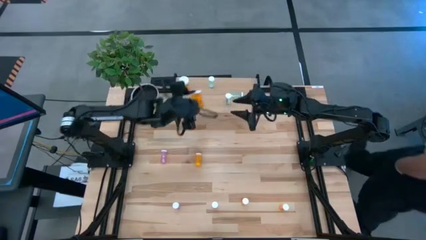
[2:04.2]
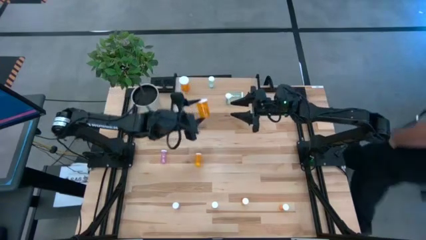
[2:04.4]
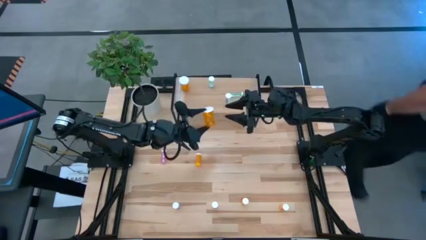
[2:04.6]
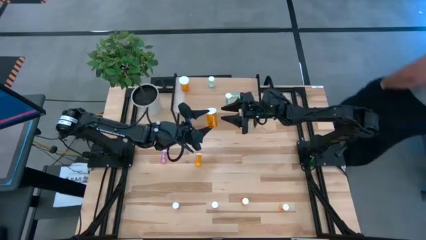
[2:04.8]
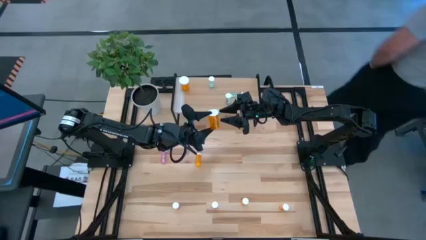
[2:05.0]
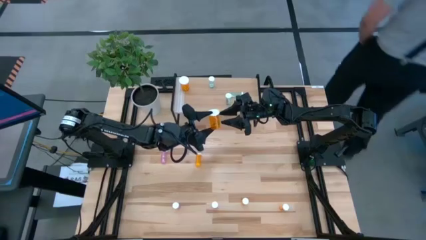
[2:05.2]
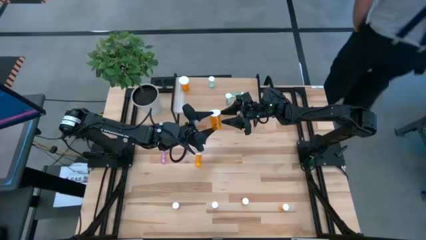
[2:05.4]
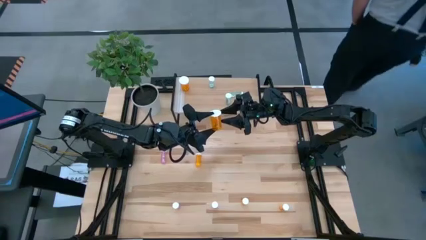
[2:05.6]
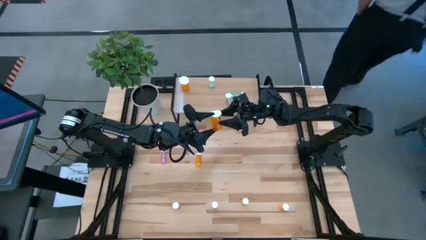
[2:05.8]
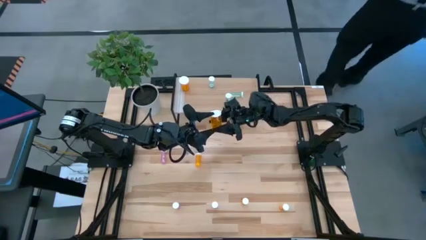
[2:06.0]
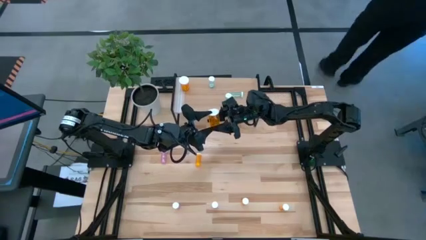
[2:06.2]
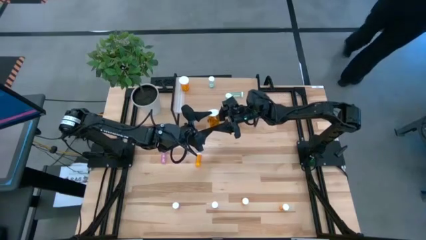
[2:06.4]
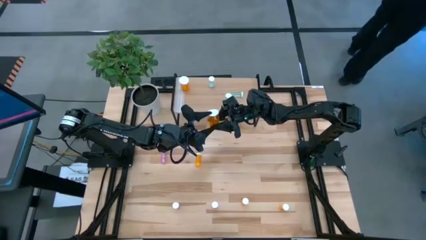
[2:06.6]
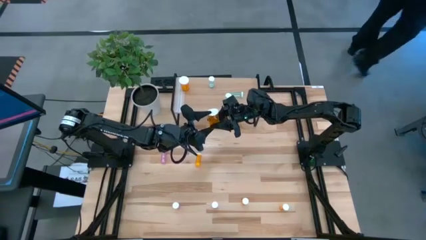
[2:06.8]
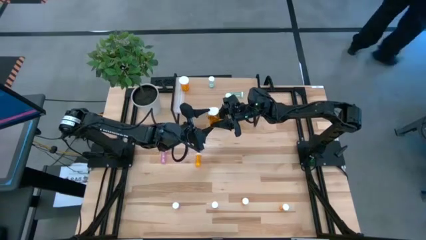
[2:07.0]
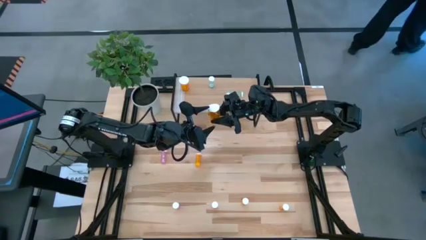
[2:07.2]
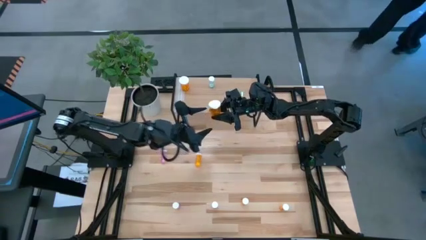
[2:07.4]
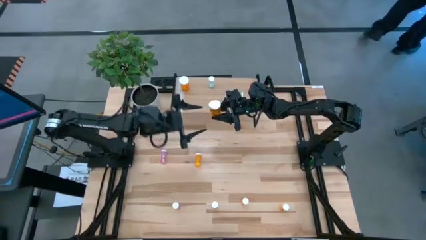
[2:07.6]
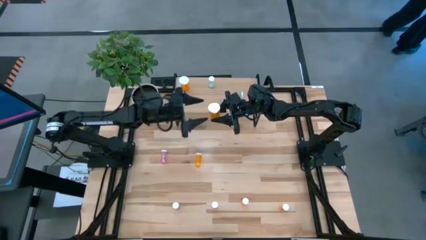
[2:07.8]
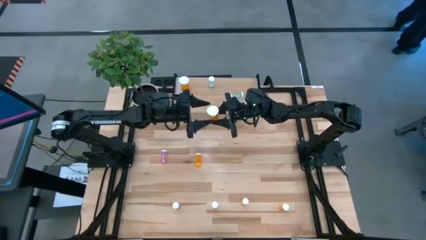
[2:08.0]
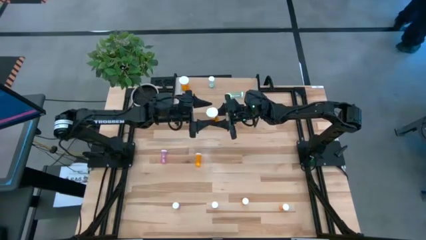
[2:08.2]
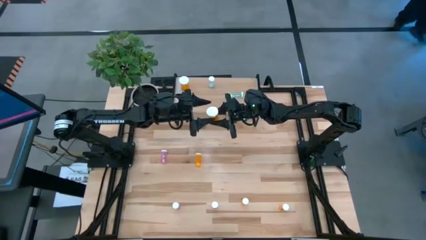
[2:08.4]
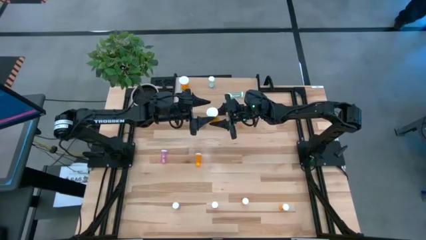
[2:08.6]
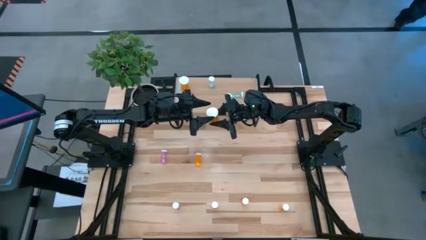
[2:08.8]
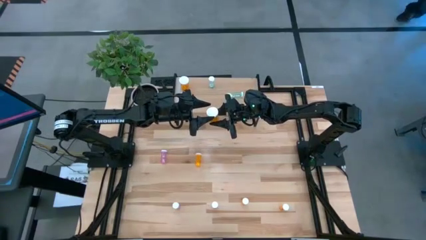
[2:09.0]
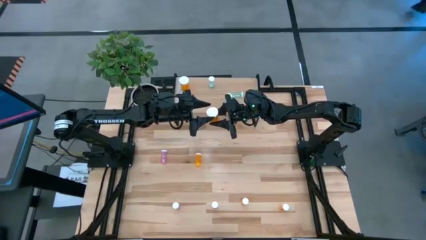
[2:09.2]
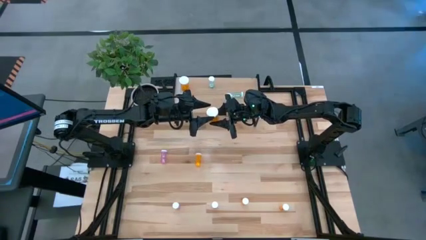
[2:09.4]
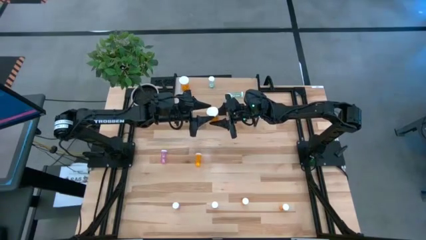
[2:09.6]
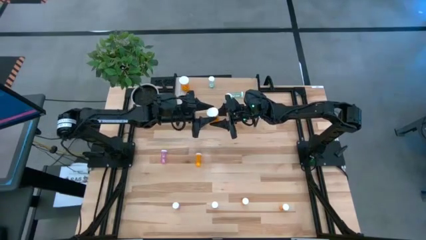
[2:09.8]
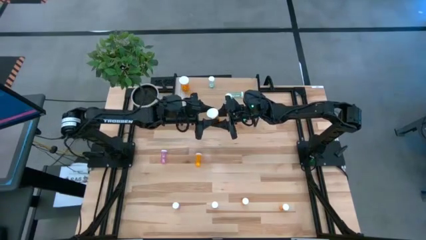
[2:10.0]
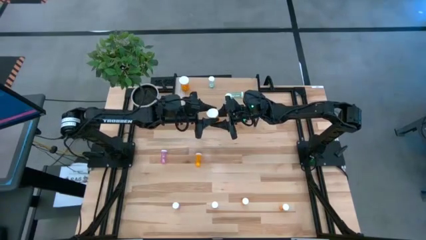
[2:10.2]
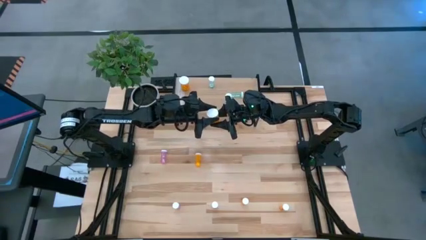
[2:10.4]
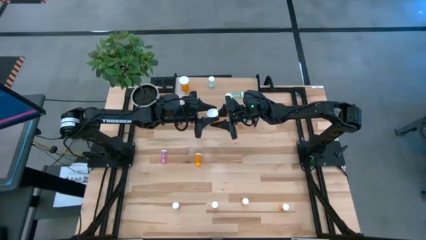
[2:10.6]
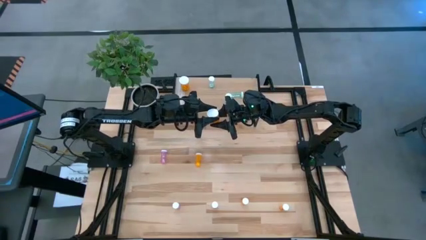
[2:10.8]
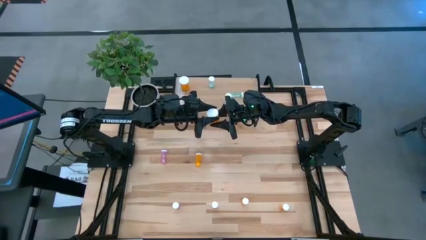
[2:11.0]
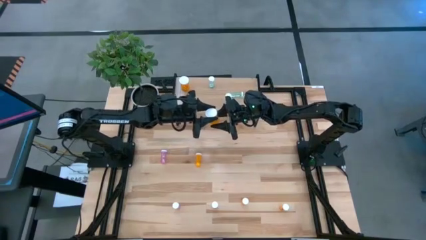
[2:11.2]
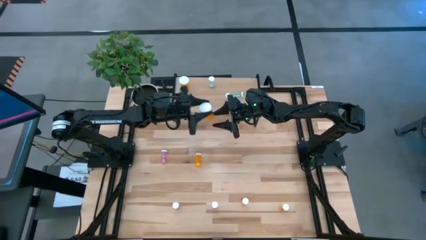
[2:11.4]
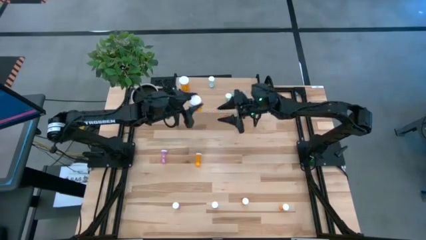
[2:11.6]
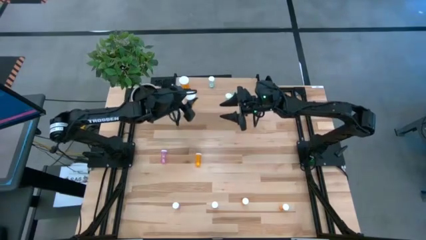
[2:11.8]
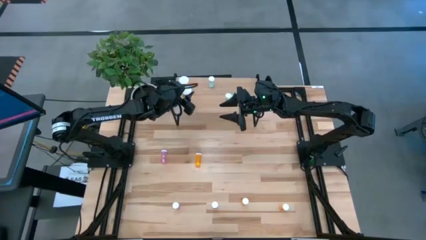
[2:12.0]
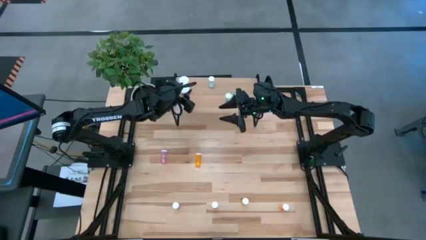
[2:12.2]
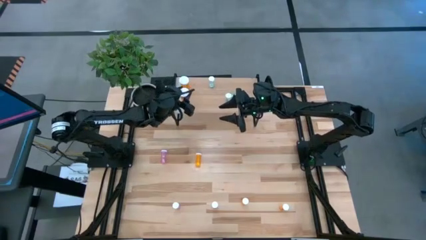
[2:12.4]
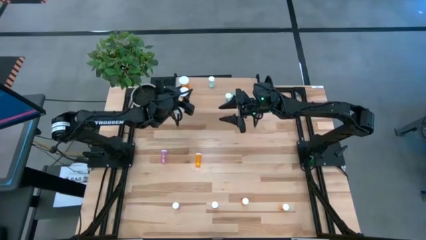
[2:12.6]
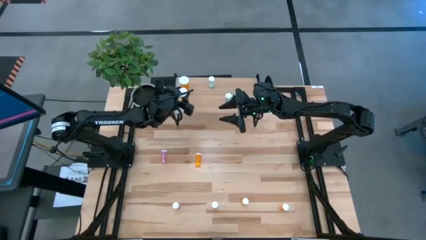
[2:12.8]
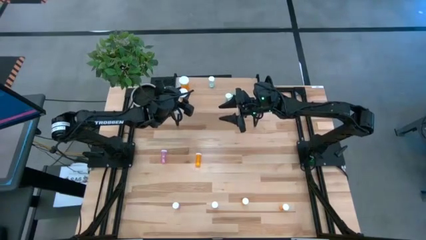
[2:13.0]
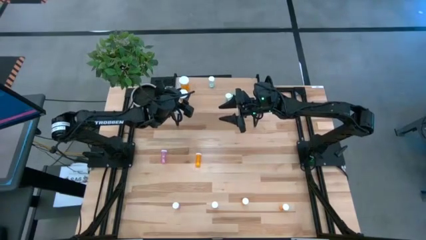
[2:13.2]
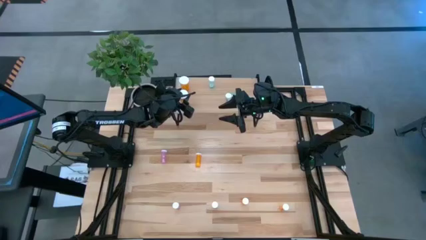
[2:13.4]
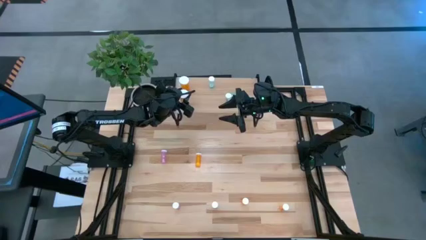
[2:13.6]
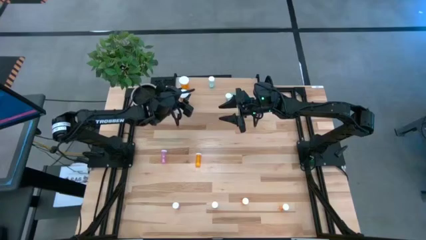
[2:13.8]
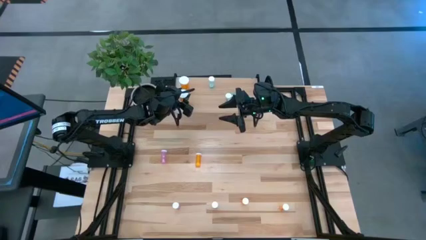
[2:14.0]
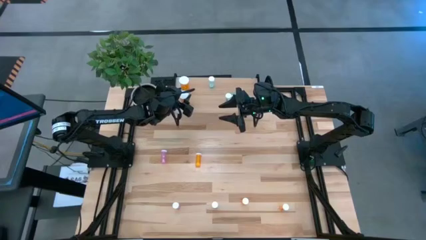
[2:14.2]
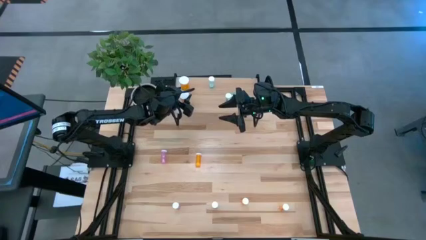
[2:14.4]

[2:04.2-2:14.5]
Task: Pick and place medicine bottles onto shelf by color
Adjust the large orange pill bottle on the shelf

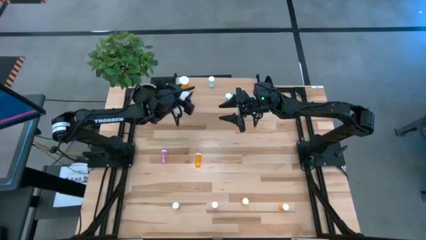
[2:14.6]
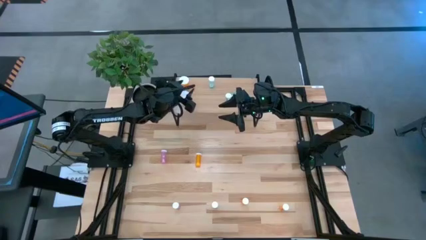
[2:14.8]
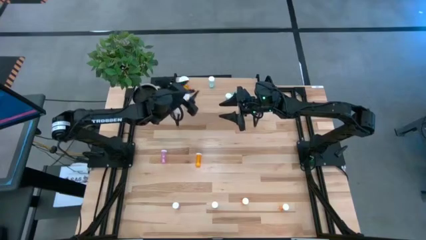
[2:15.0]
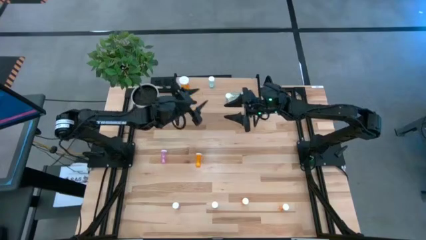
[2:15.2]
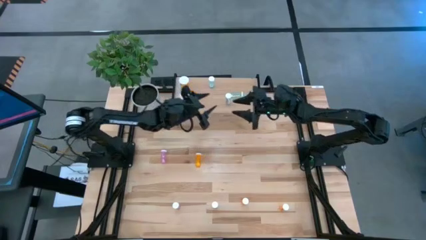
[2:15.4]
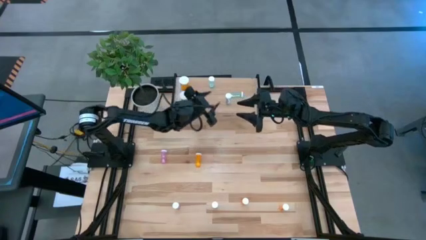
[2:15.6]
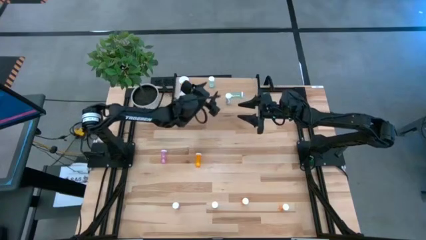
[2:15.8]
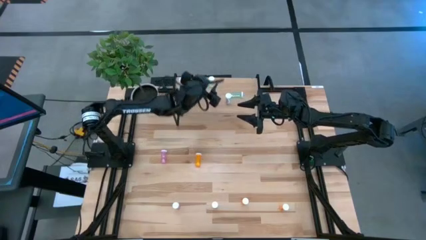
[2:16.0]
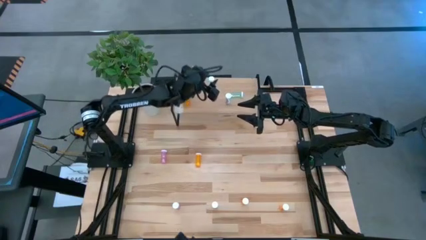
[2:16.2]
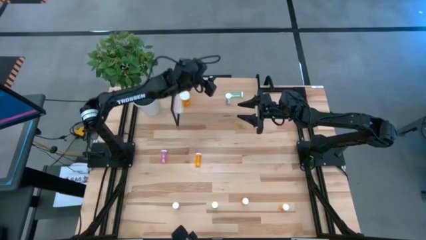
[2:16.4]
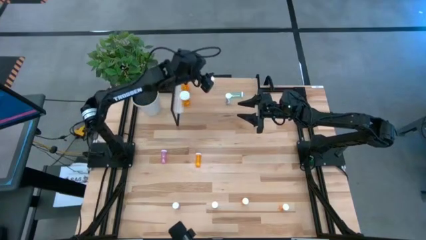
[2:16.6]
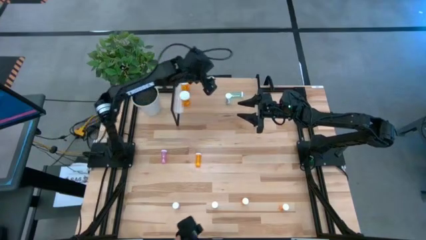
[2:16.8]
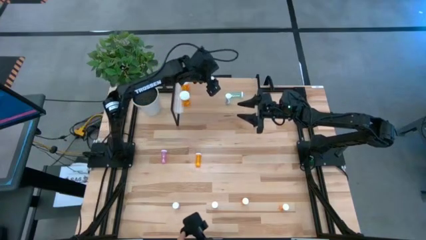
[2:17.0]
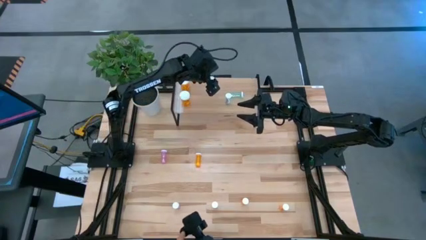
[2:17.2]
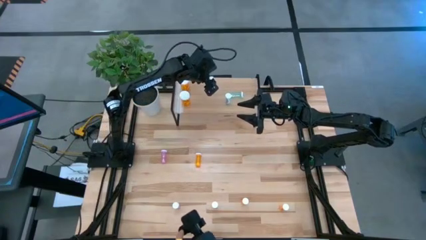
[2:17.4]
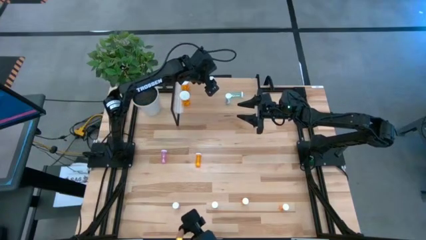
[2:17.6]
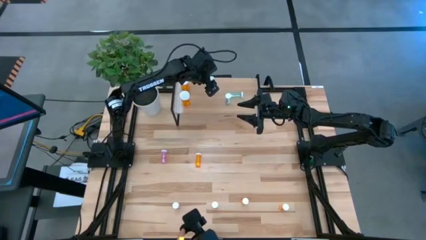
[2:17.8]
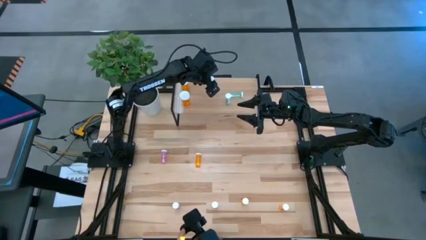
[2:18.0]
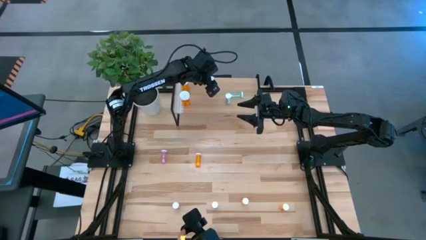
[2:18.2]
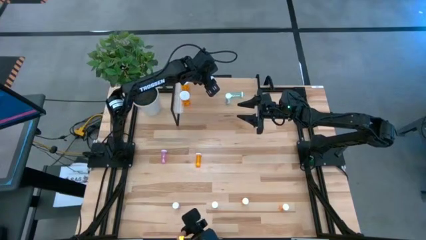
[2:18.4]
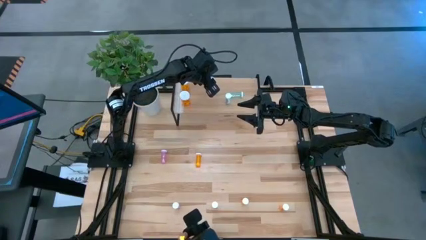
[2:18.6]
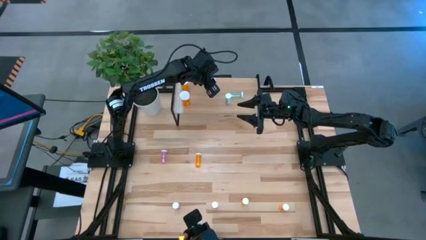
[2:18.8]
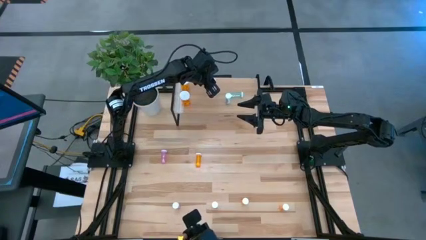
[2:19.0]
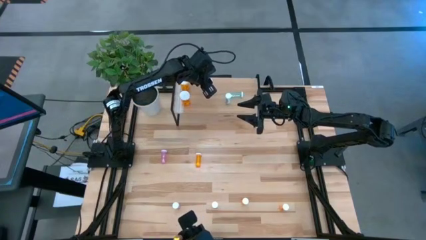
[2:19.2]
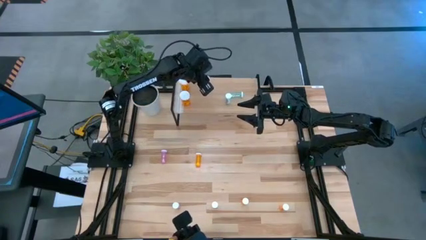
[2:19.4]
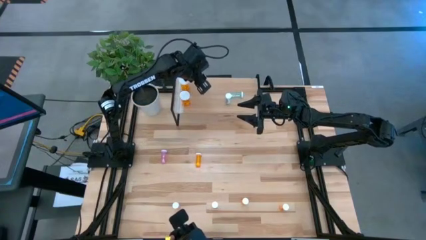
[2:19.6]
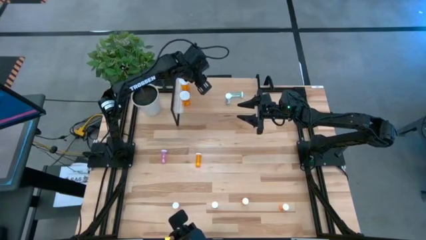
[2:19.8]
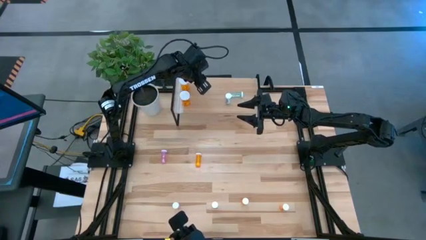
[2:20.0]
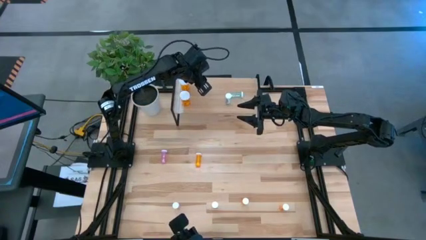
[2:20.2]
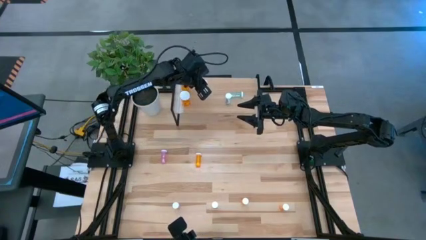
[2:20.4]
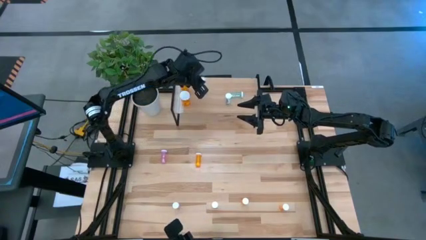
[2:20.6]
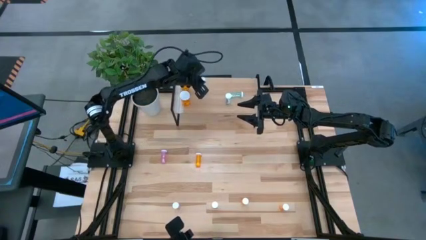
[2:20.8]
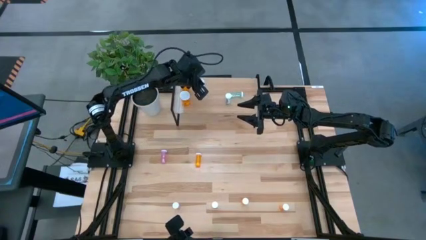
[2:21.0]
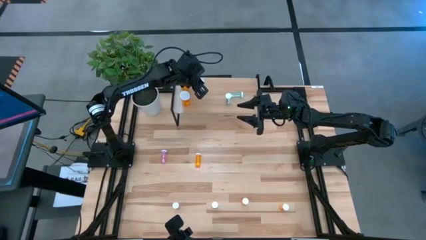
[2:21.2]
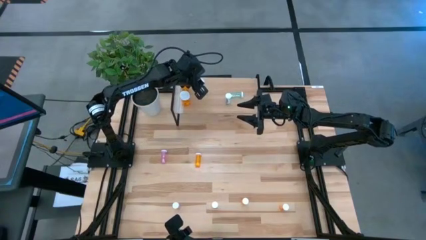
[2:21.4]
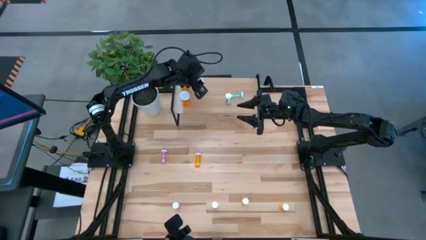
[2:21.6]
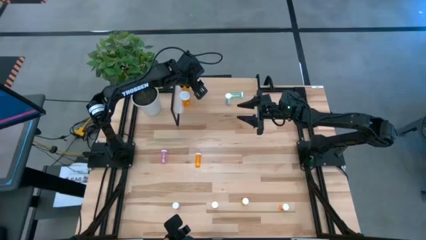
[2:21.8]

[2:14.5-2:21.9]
Adjust the green pill bottles on the shelf
